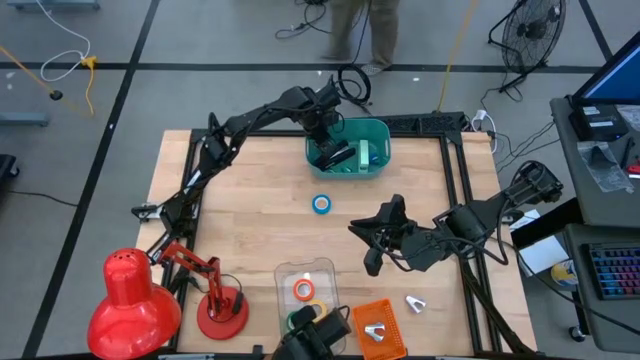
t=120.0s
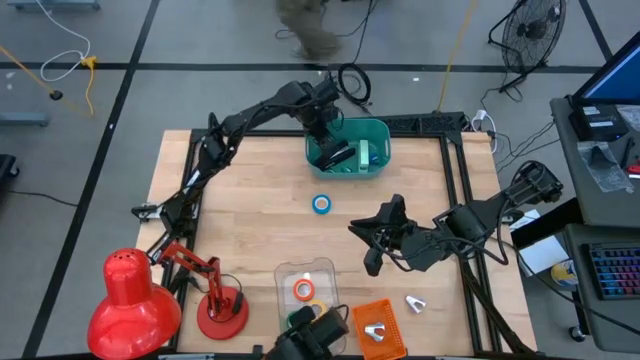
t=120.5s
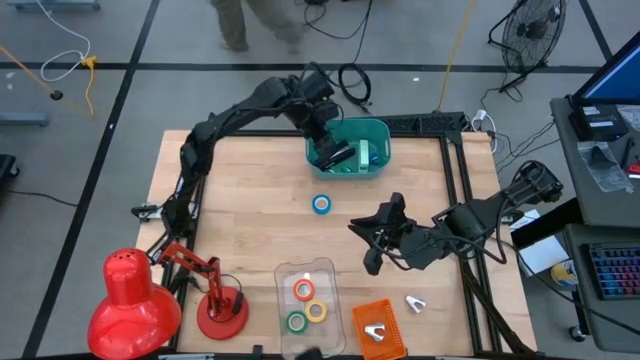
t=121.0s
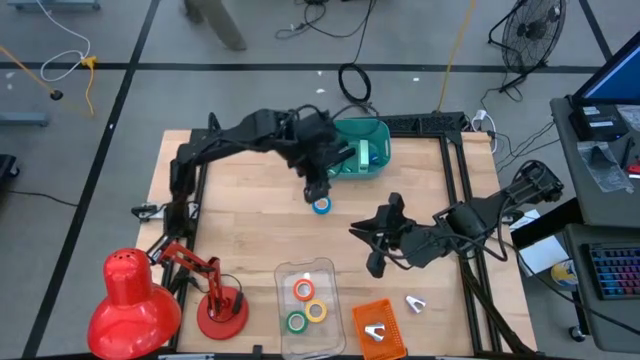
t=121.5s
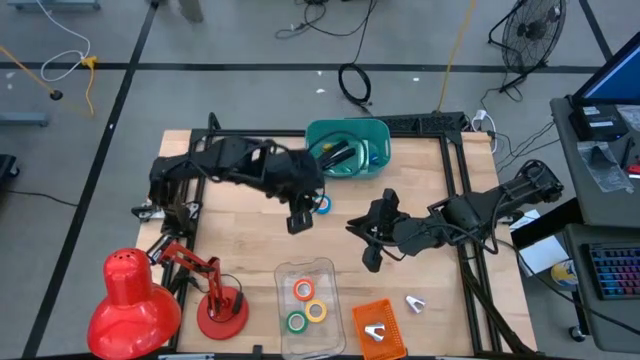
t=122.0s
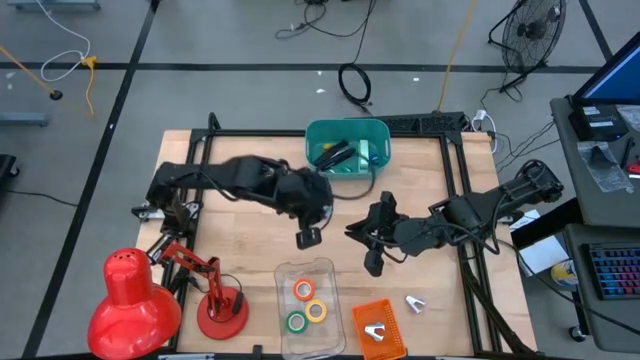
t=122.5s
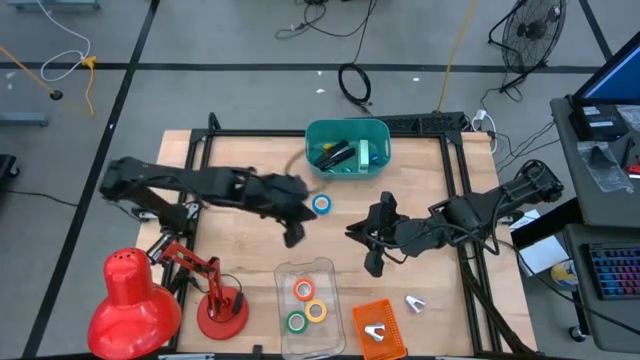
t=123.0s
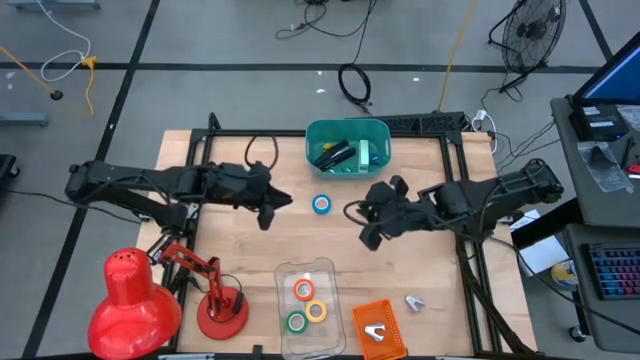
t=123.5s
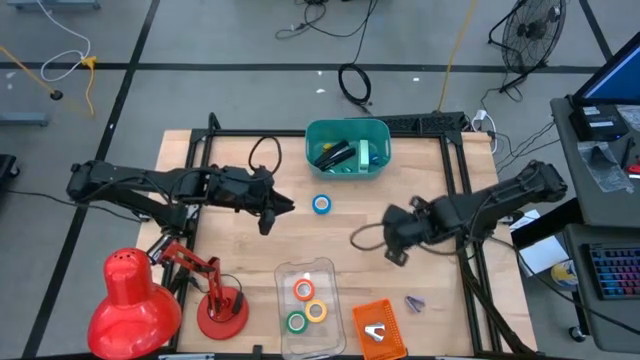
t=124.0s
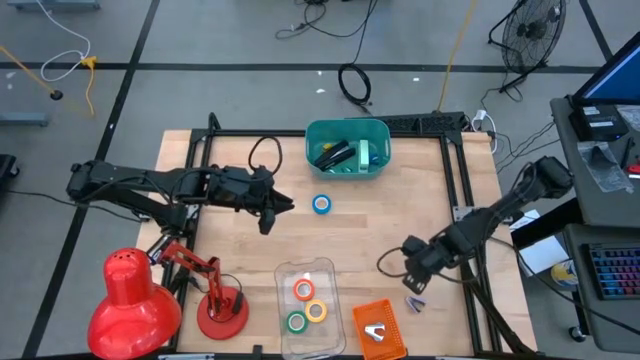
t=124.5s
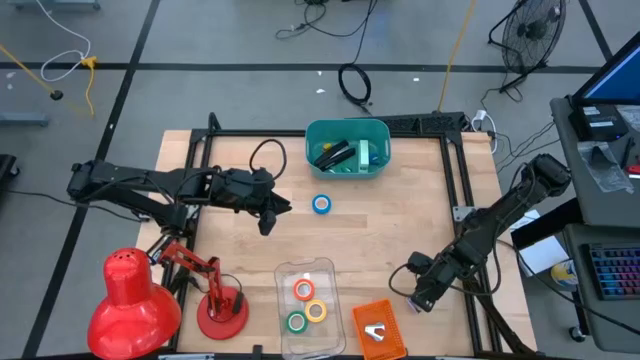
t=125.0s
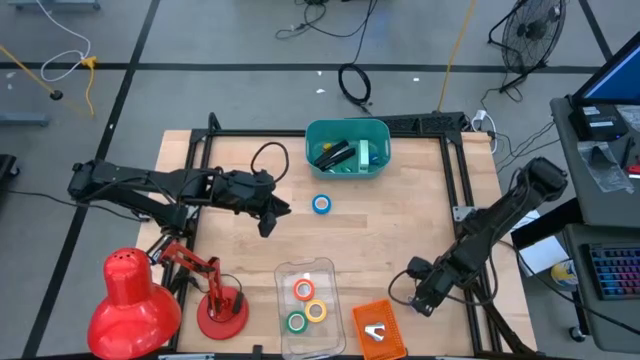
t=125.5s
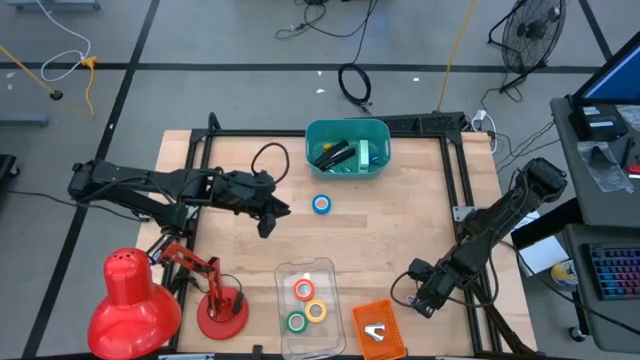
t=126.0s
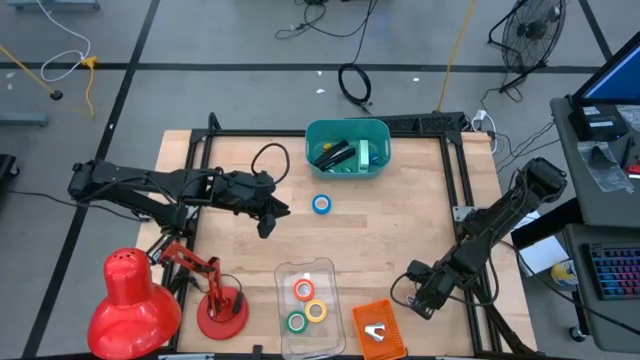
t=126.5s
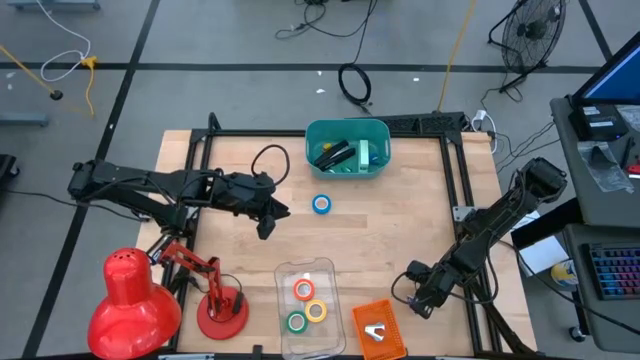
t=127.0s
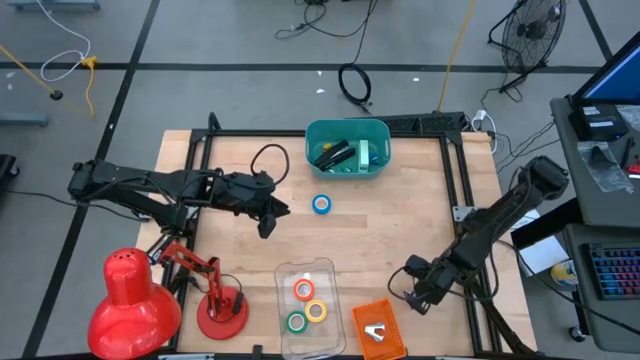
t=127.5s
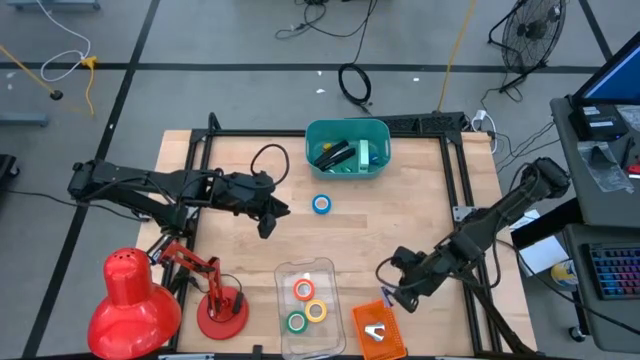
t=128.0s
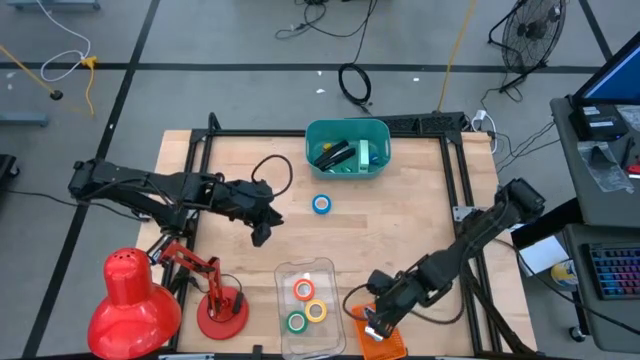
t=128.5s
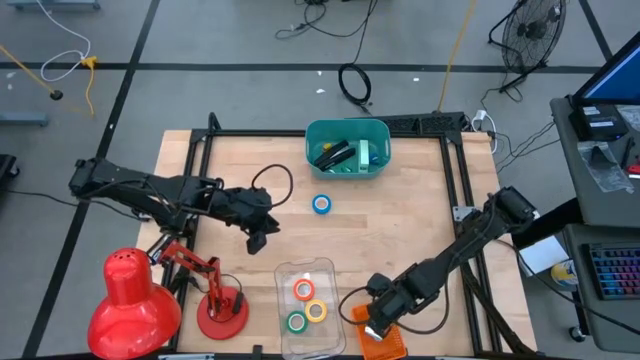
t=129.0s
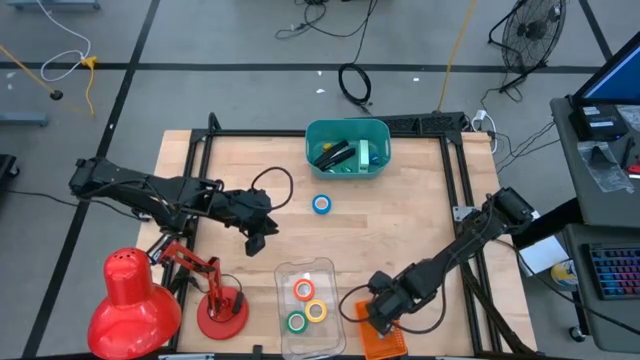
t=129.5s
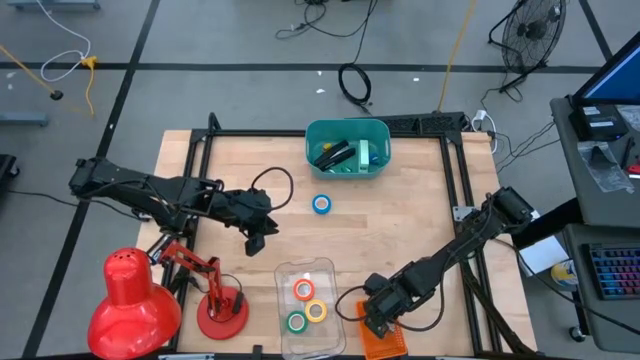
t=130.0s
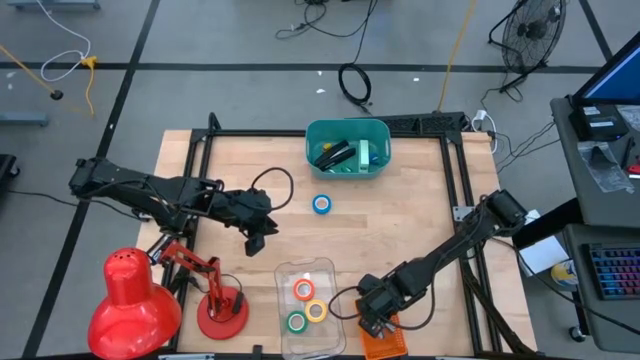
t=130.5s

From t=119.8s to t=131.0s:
Task: Pick and place Stapler, Stapler remover, tape
Put the purple staple remover into the orange basket

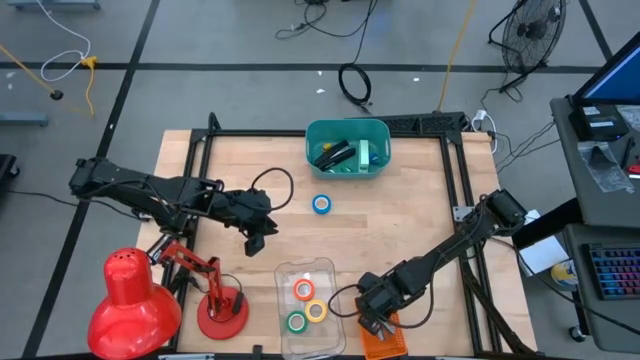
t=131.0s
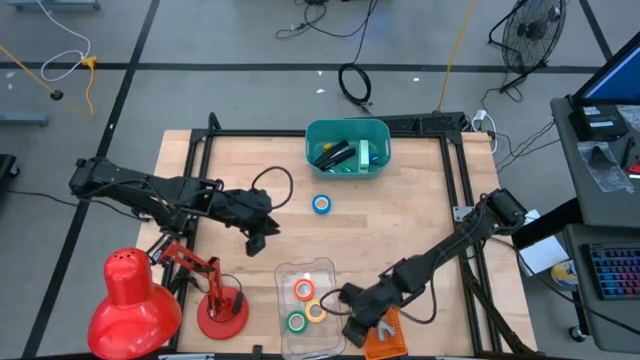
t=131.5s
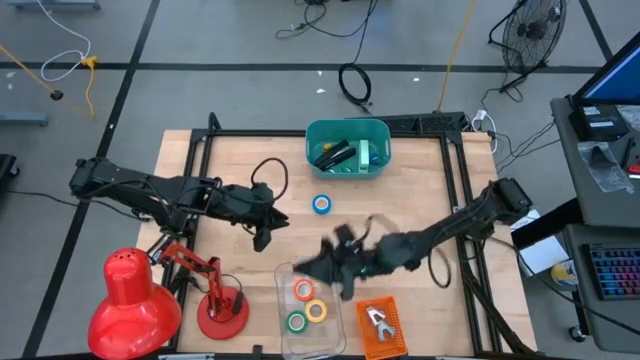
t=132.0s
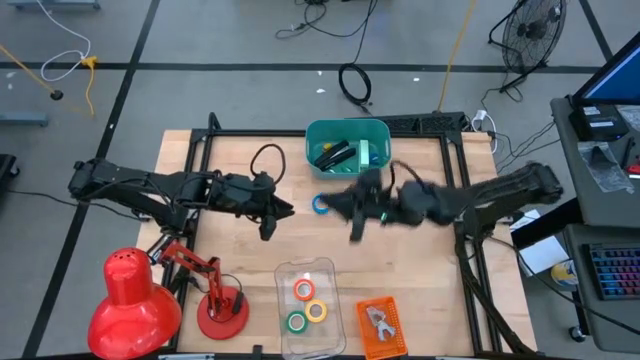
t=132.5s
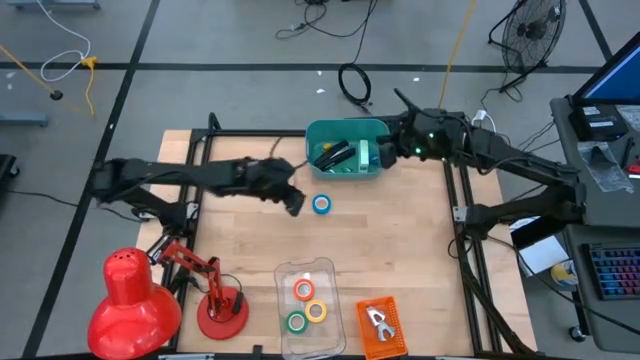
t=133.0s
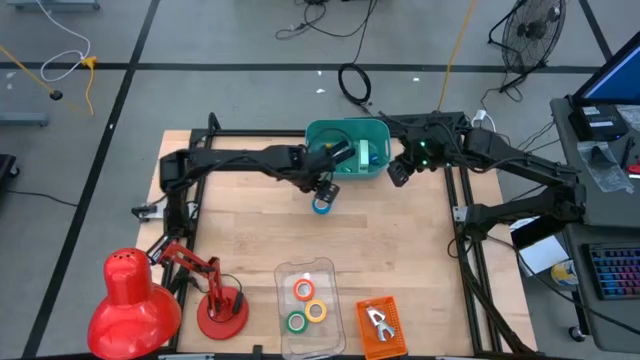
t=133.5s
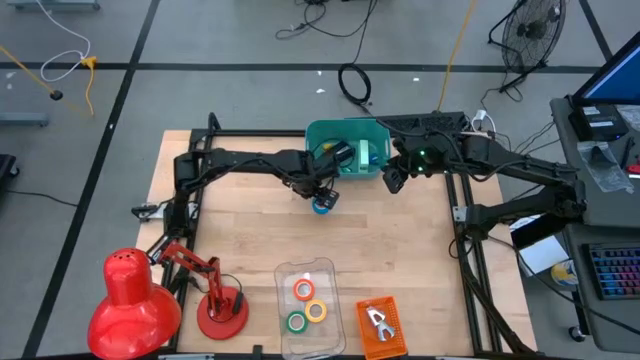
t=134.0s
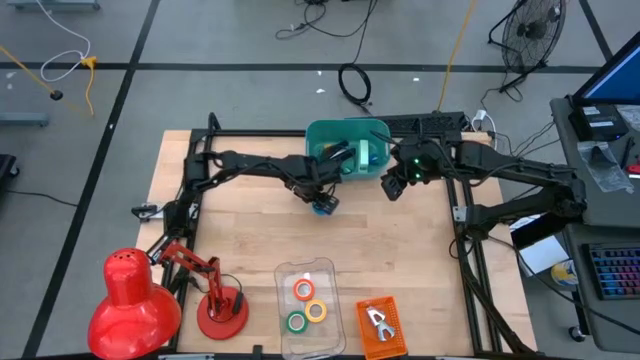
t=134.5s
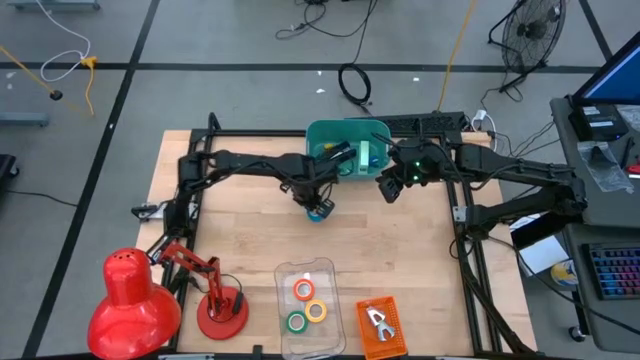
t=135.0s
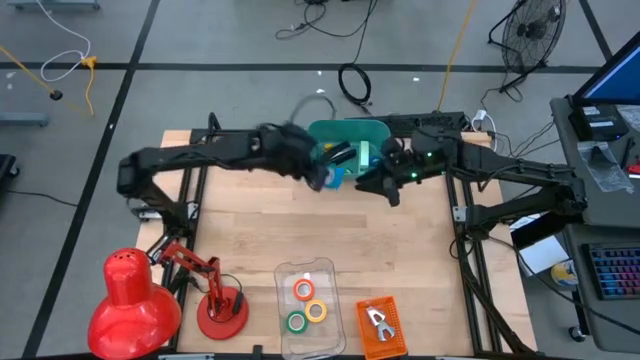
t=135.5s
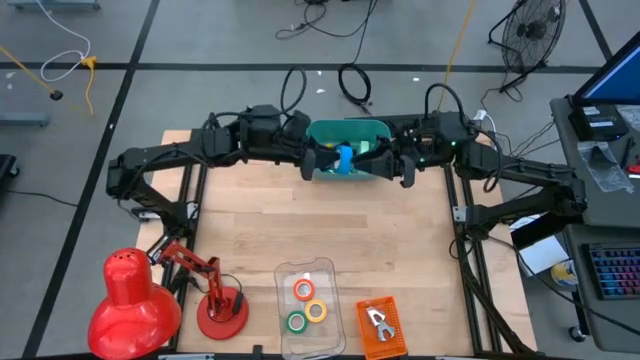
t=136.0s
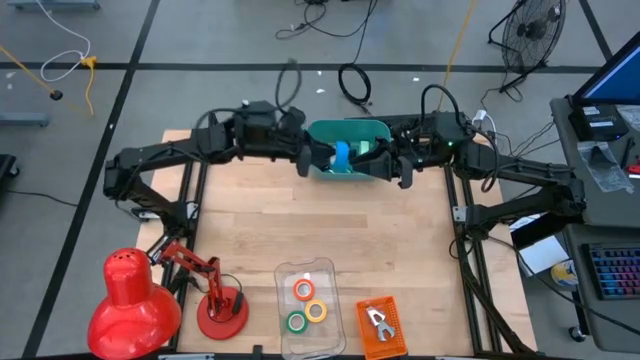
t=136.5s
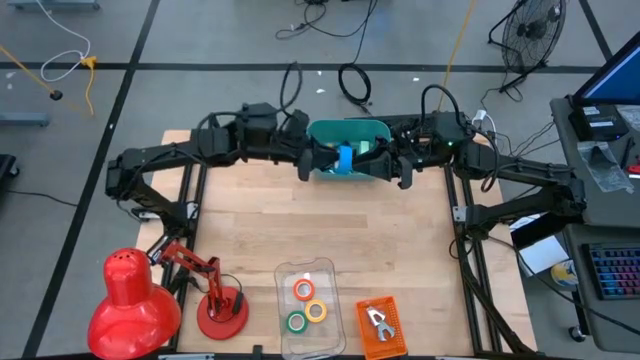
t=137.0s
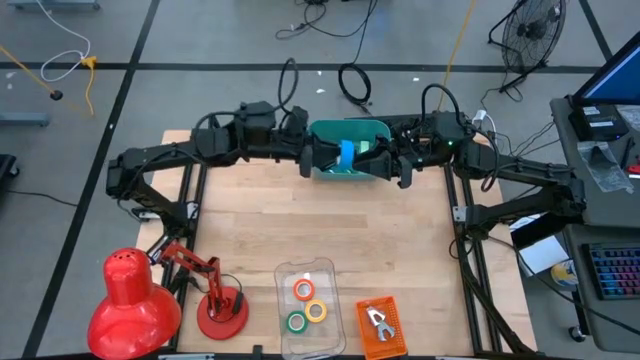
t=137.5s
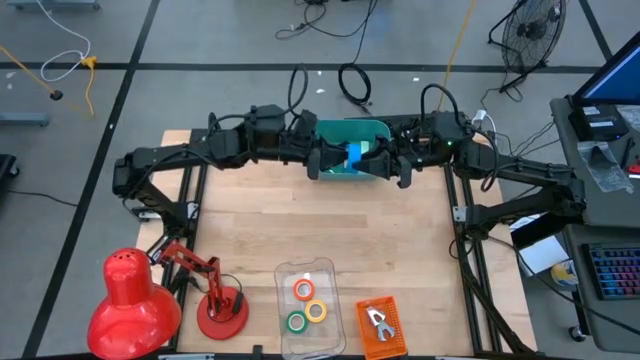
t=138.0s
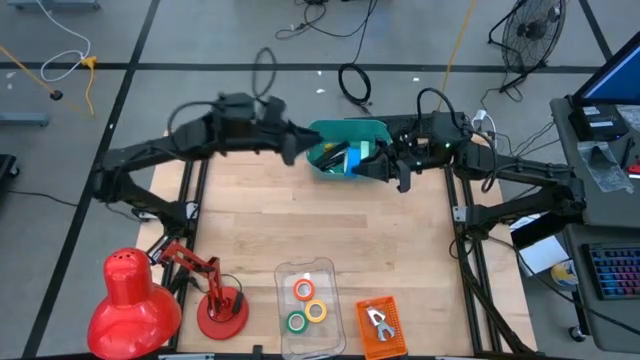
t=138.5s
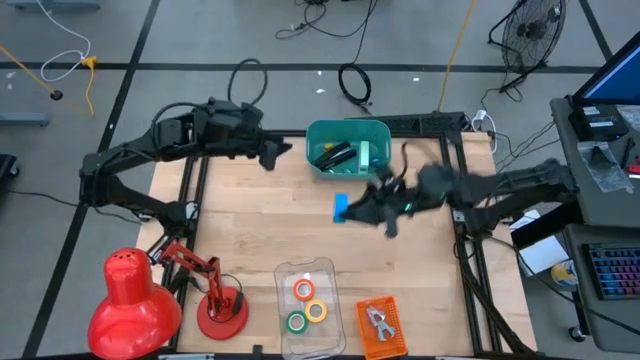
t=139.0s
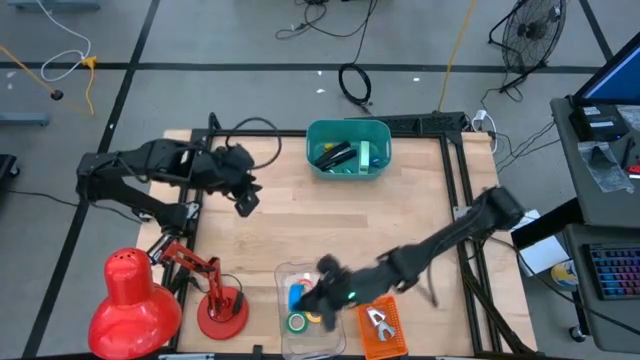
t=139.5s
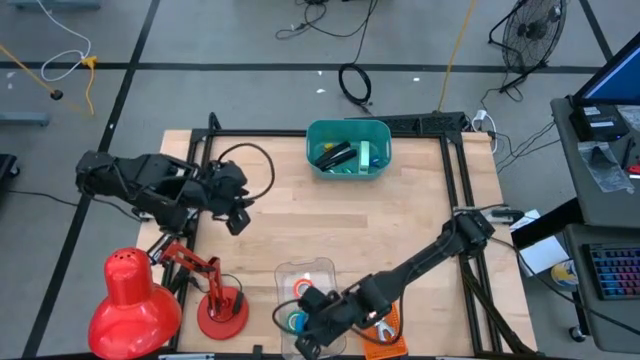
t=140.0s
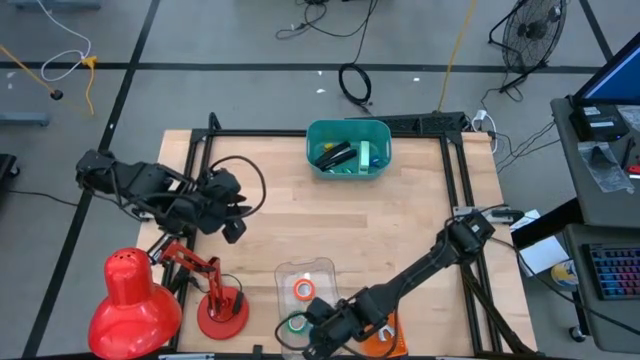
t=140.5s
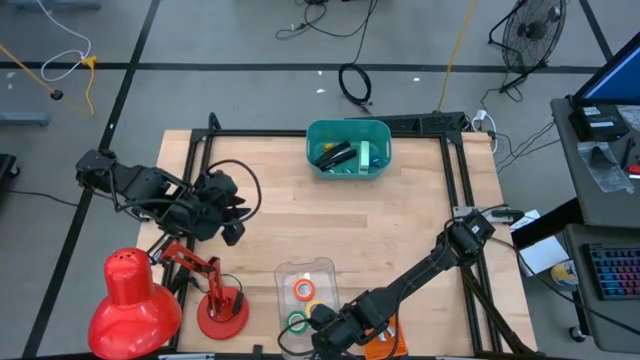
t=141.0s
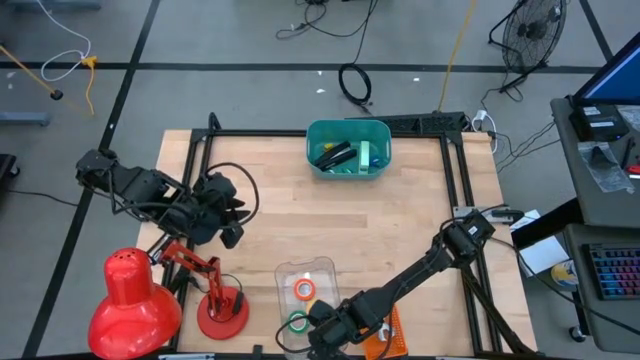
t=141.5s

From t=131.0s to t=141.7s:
Put the blue tape into the transparent bin
